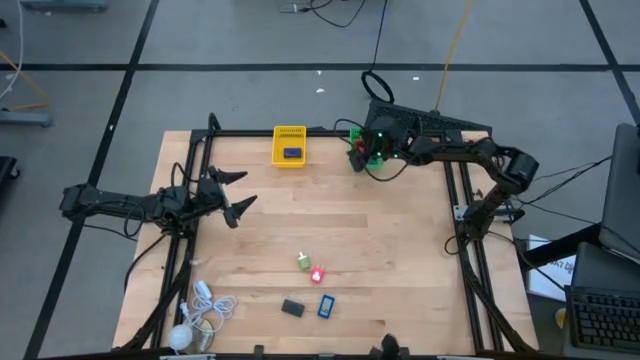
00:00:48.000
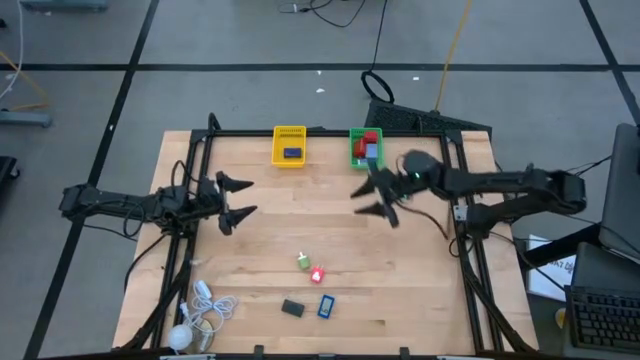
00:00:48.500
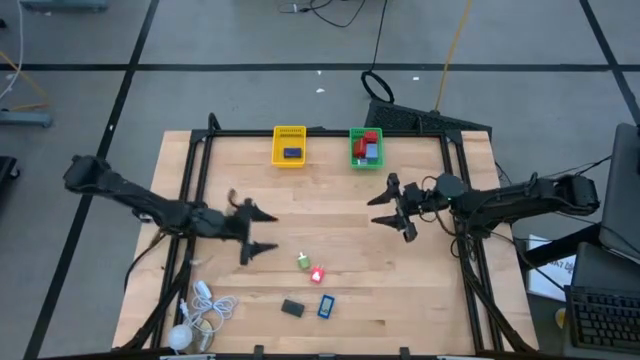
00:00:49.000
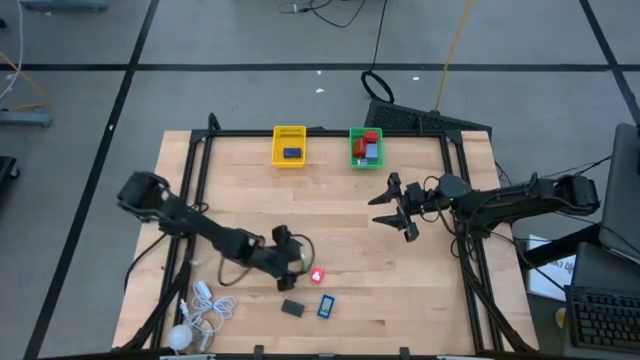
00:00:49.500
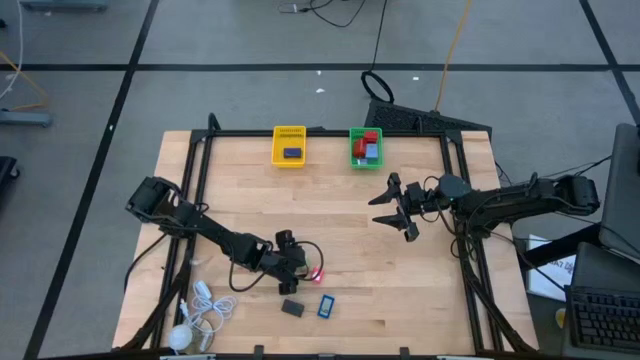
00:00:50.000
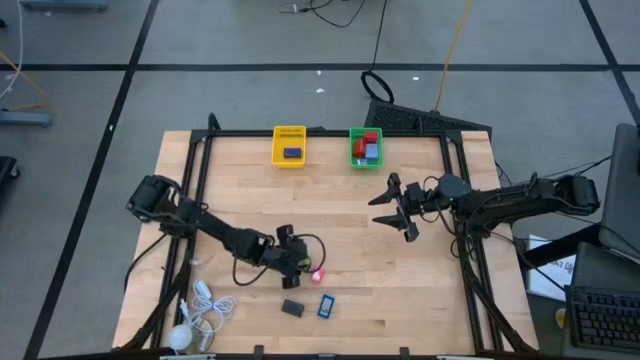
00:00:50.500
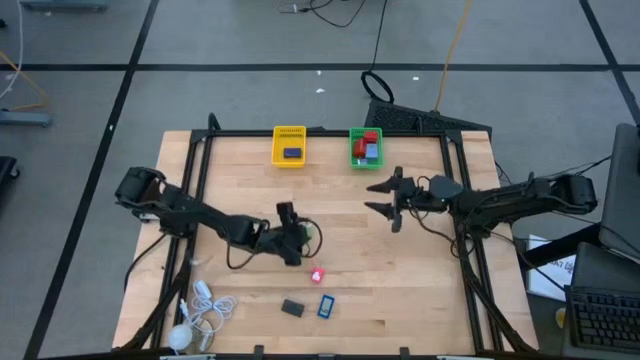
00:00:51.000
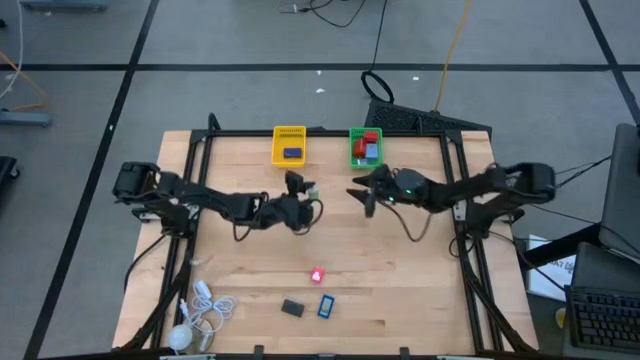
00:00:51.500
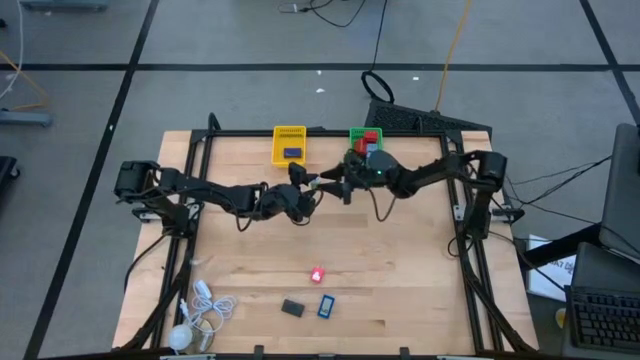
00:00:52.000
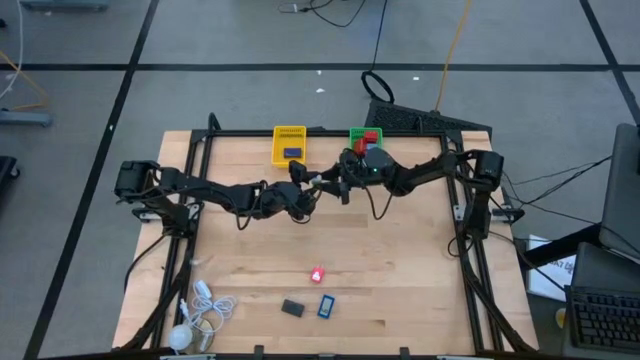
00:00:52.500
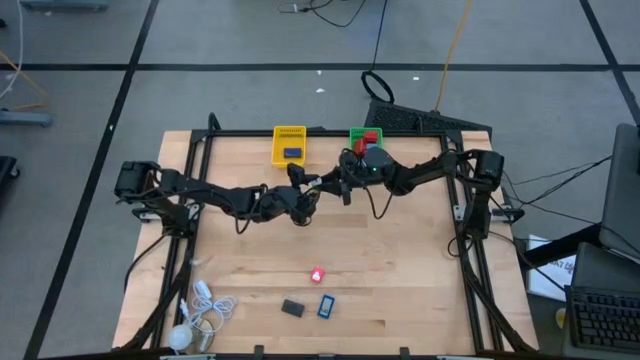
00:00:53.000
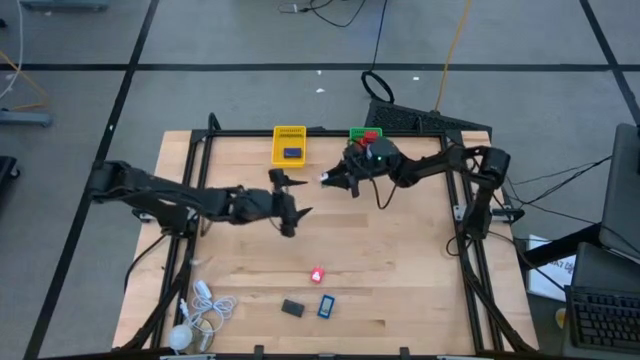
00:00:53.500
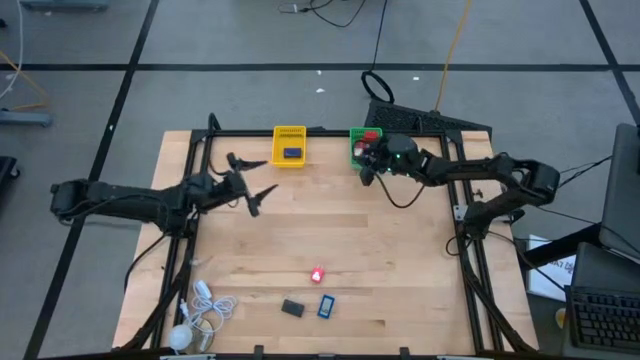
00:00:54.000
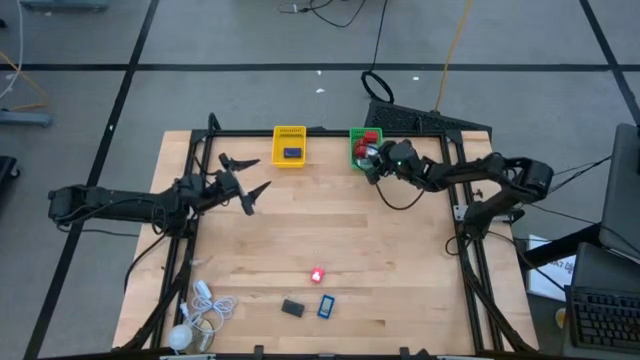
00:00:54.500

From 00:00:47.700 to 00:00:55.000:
Task: Pick & Place Office items
Put the green charger adapter into the green bin

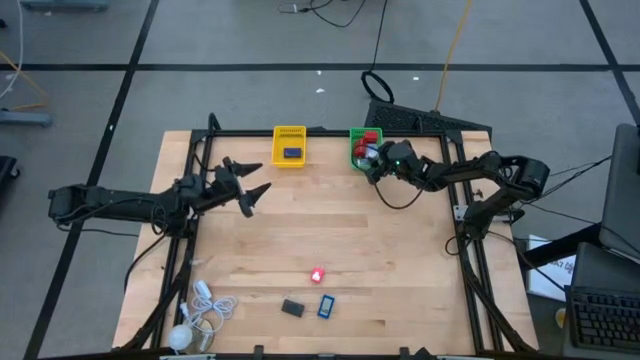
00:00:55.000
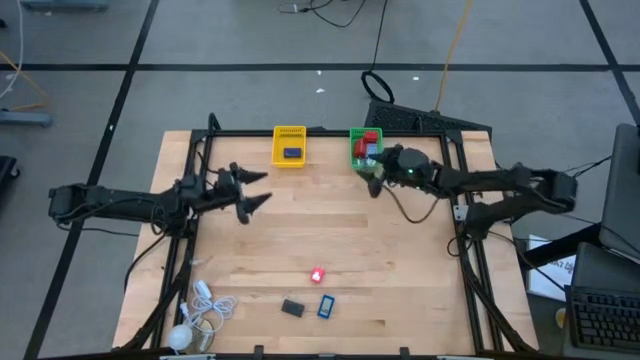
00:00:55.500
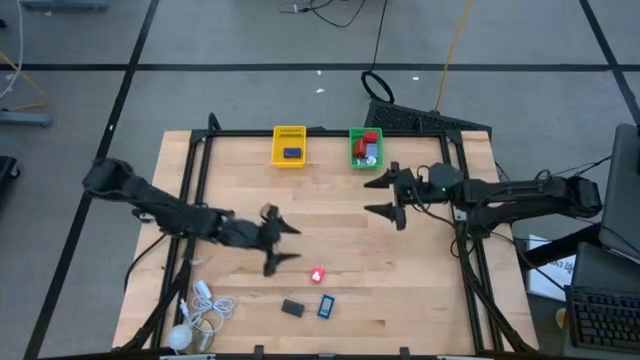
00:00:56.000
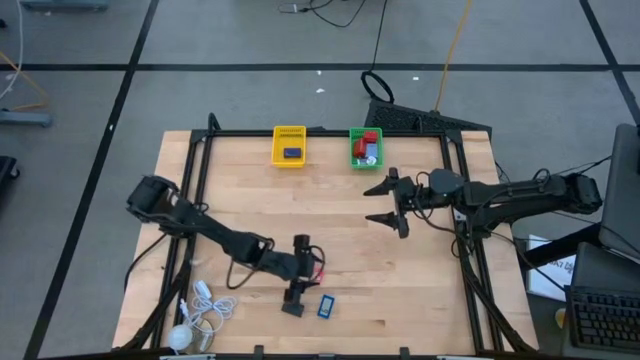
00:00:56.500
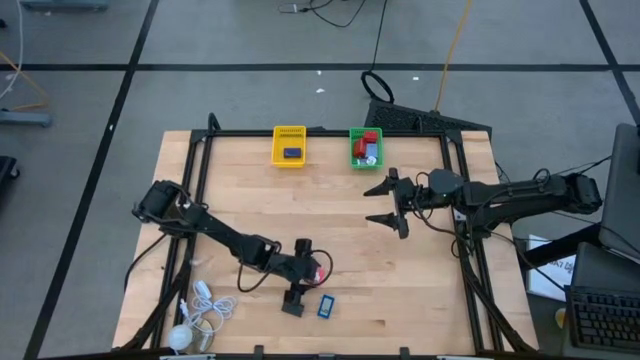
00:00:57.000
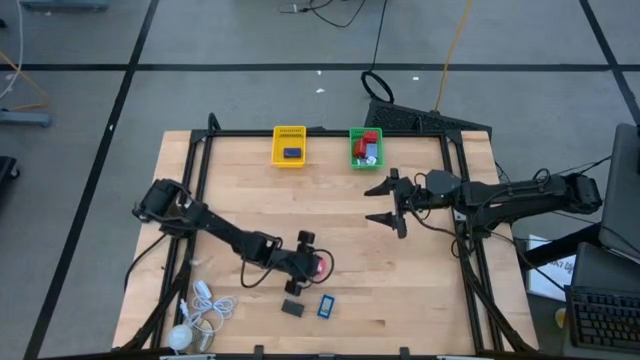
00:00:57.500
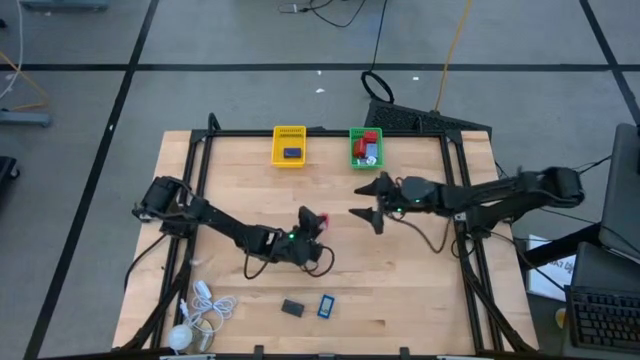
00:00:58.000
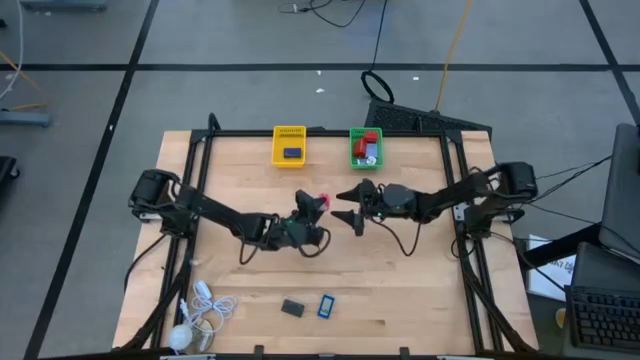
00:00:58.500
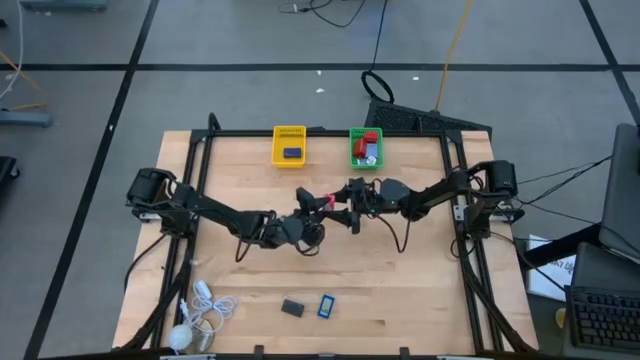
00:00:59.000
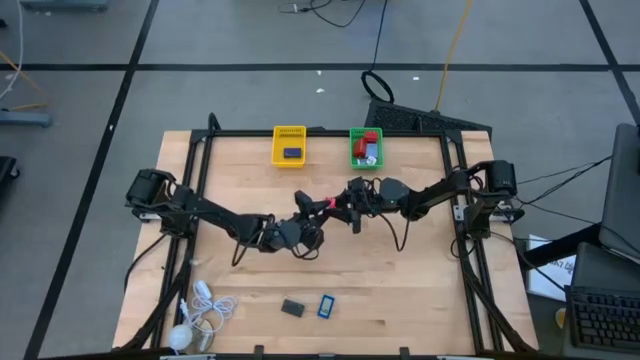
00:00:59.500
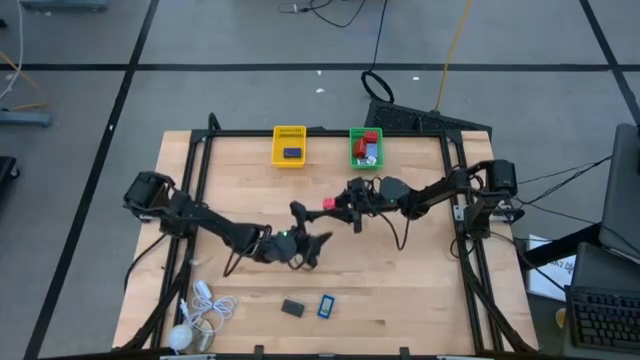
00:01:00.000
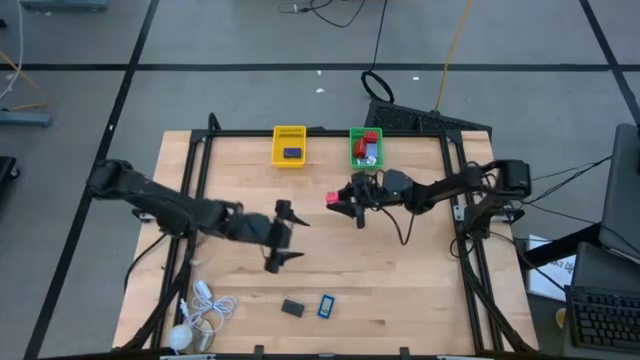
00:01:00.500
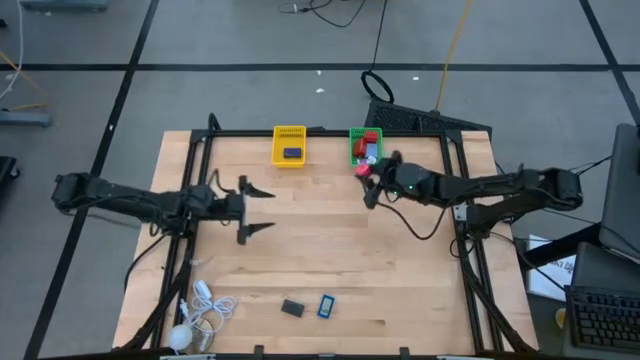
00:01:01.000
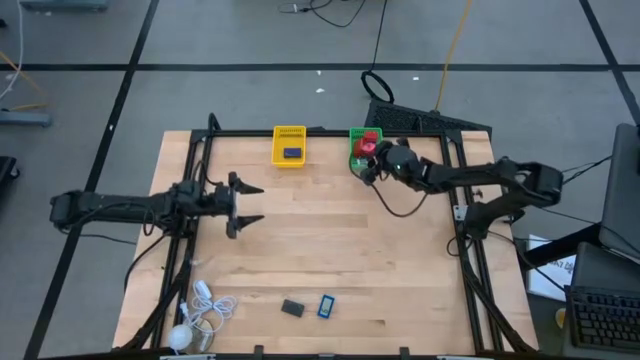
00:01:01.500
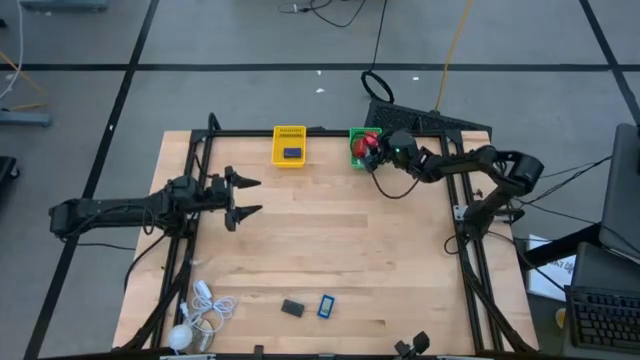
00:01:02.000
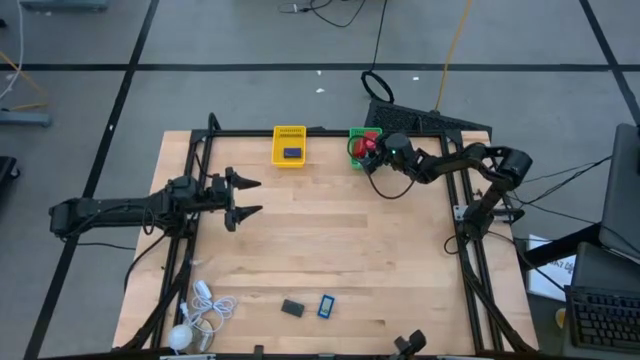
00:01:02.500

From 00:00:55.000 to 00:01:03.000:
Put the pink charger adapter into the green bin

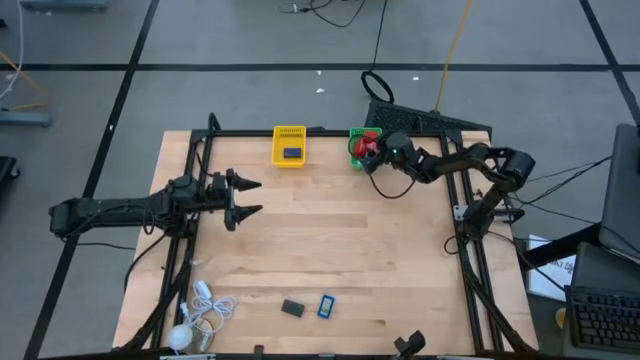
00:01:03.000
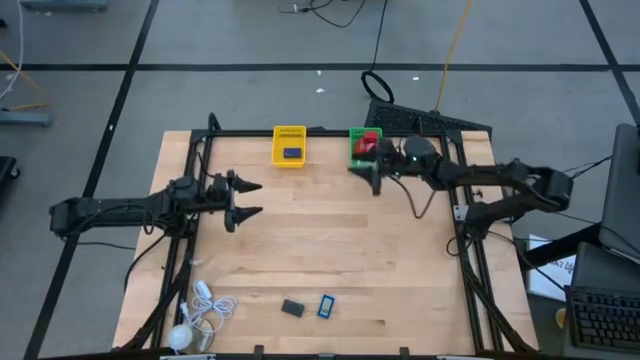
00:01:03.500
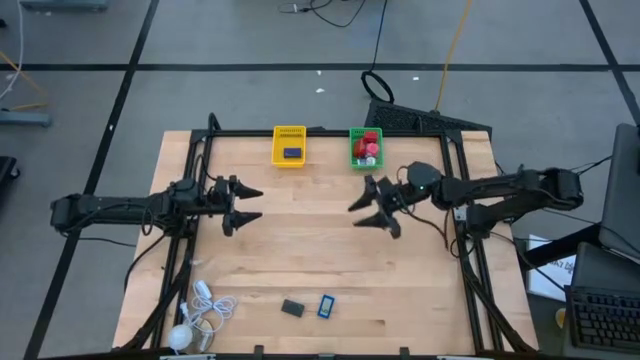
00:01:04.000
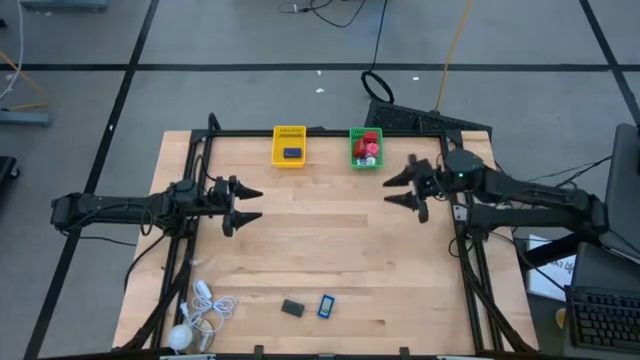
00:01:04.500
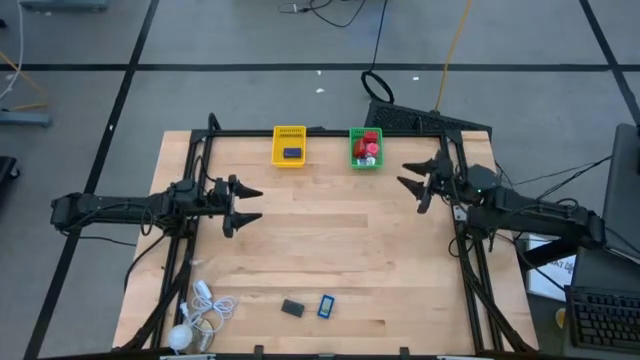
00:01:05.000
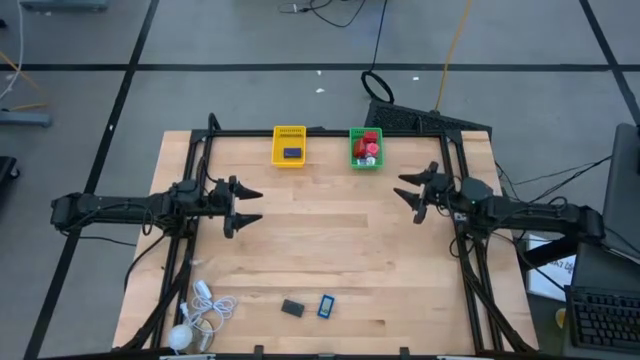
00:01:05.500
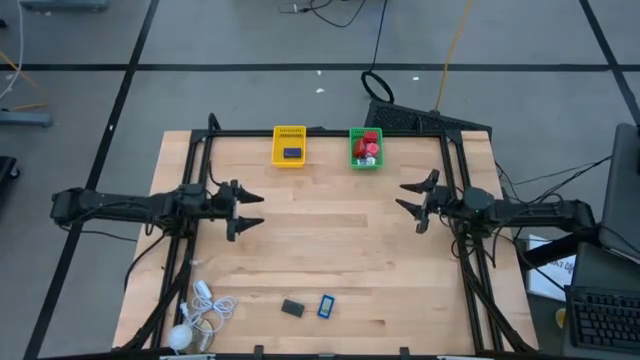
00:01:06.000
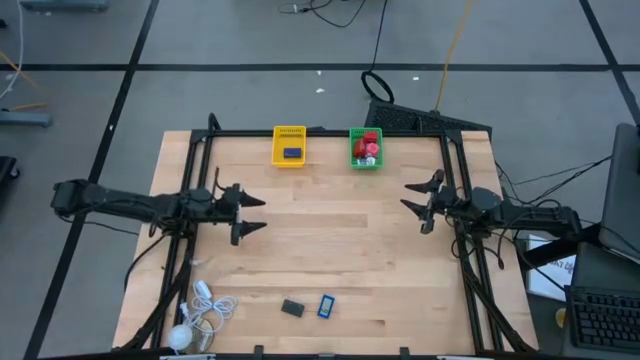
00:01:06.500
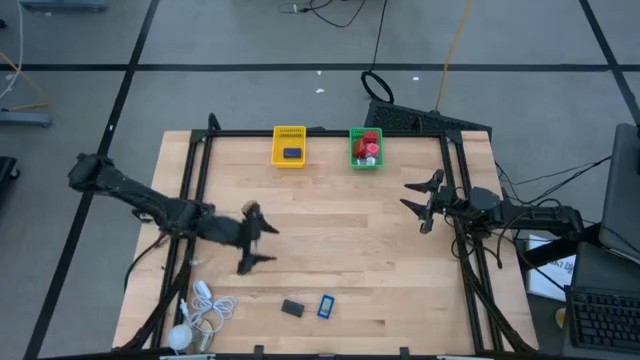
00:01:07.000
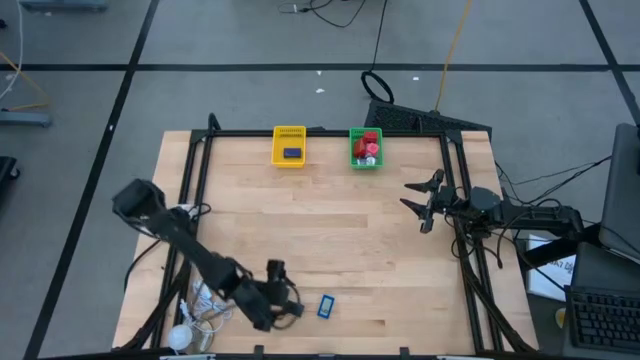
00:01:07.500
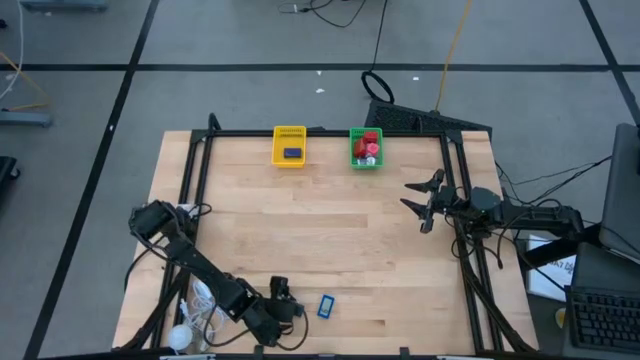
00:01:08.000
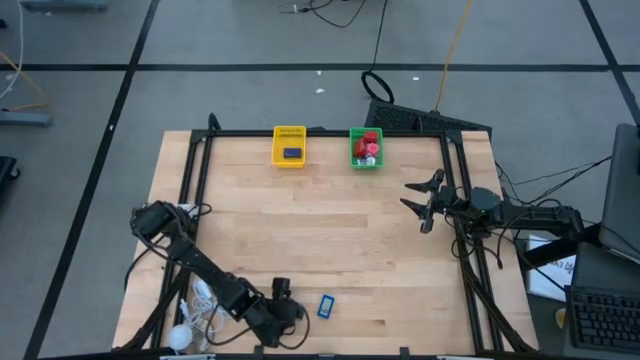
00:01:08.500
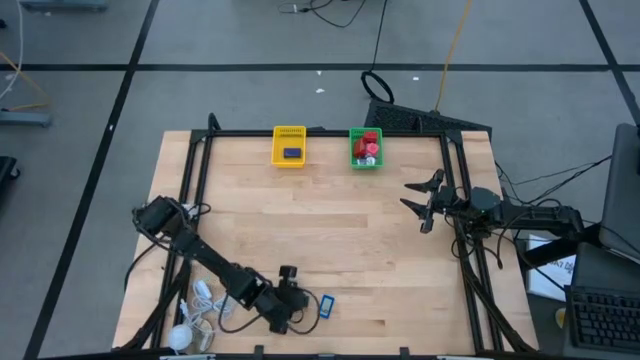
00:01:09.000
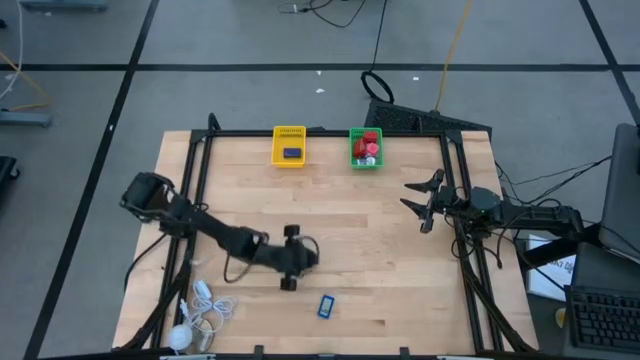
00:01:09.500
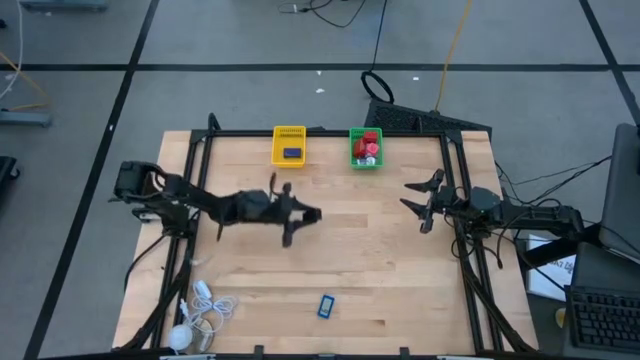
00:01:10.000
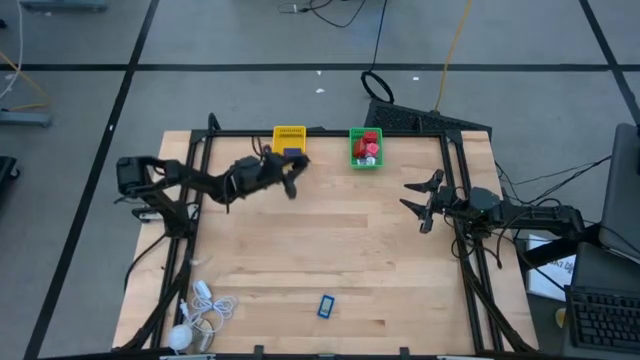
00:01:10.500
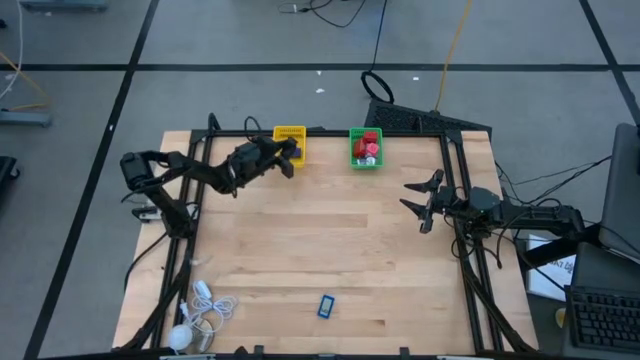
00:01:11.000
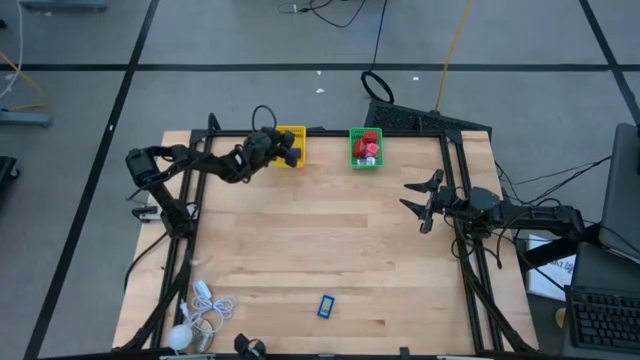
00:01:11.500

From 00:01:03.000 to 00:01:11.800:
Put the black digital timer into the yellow bin
